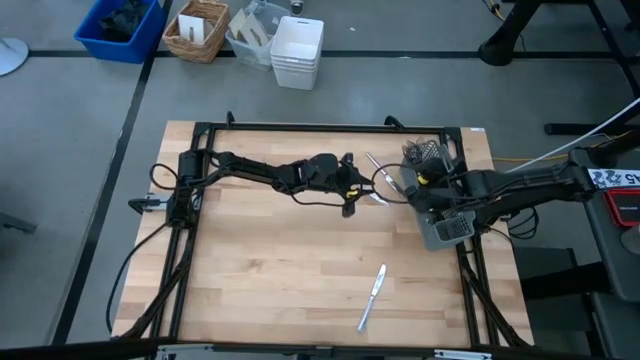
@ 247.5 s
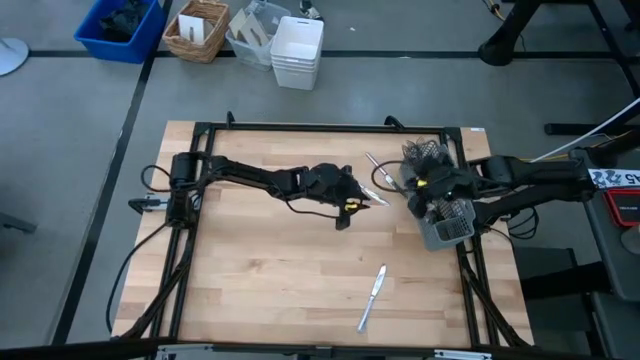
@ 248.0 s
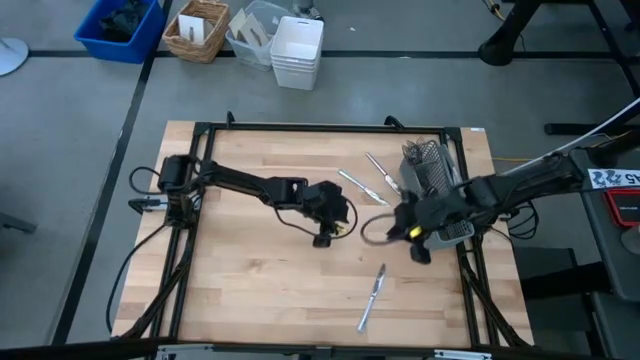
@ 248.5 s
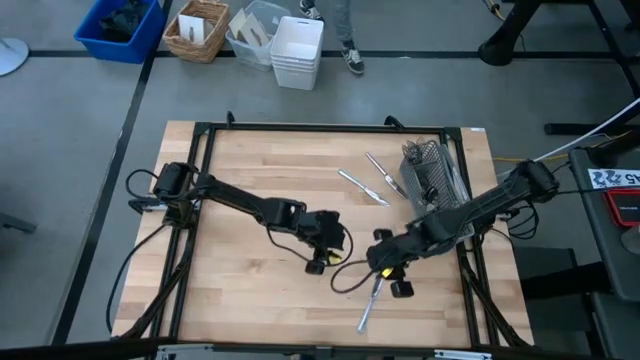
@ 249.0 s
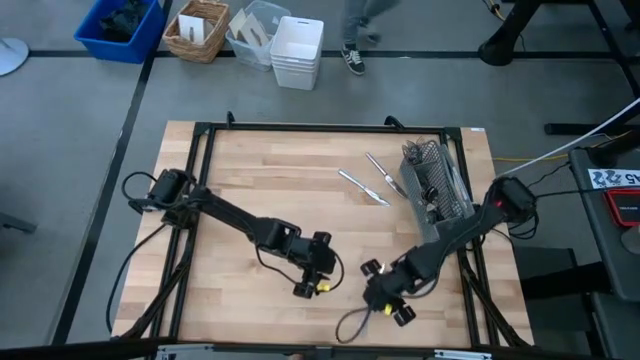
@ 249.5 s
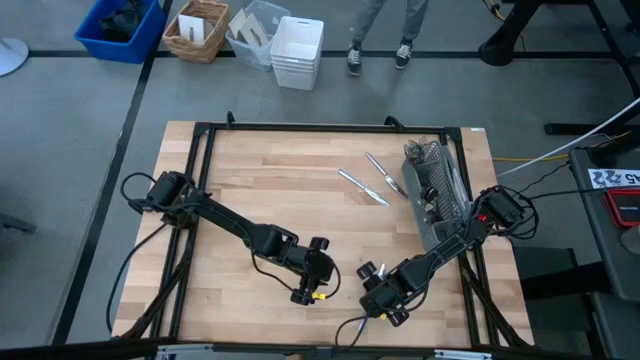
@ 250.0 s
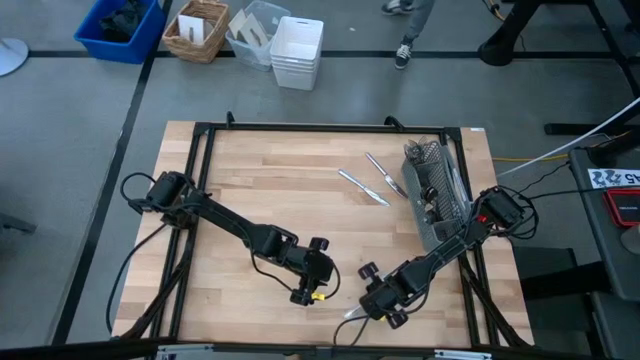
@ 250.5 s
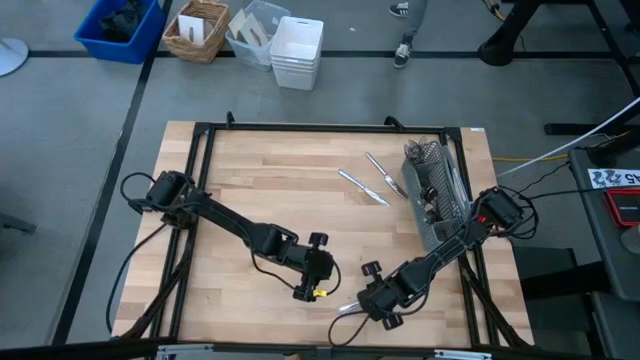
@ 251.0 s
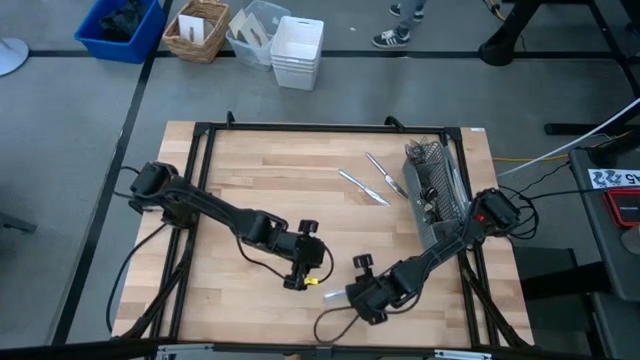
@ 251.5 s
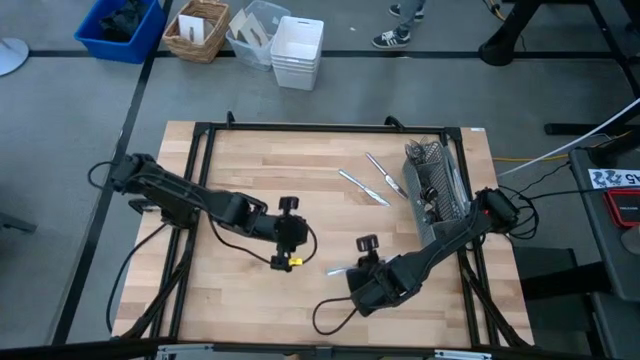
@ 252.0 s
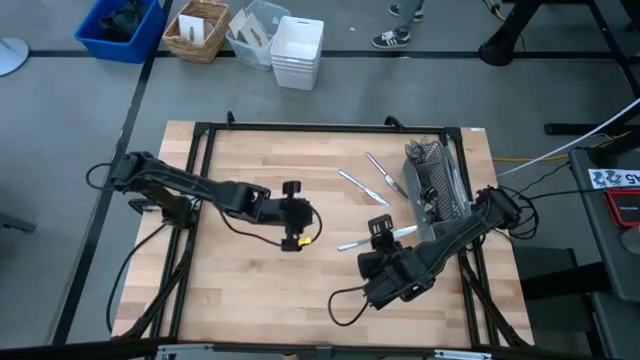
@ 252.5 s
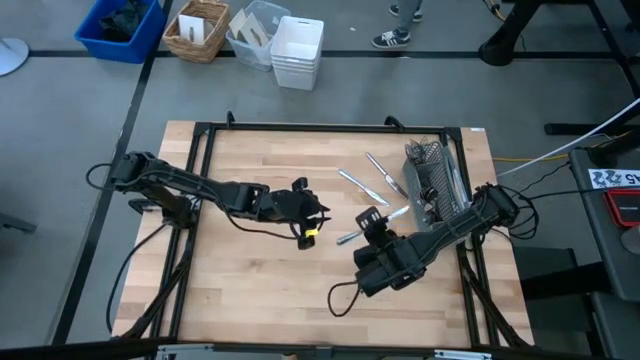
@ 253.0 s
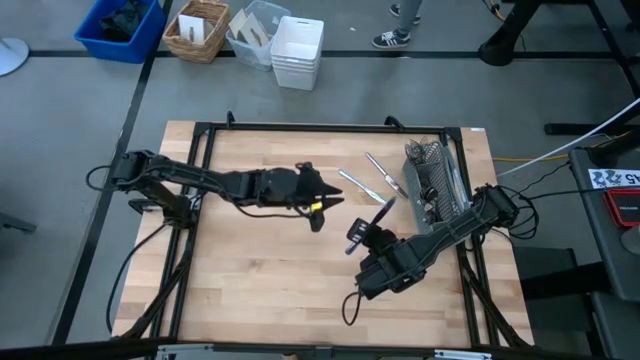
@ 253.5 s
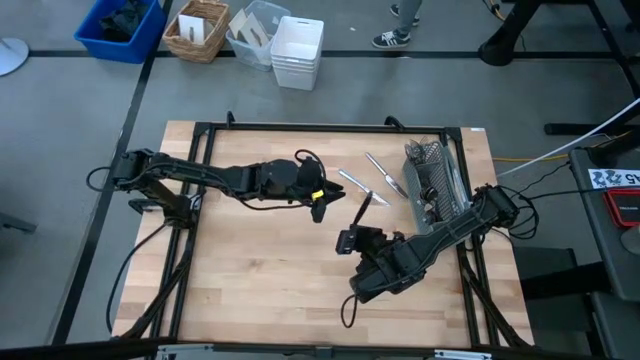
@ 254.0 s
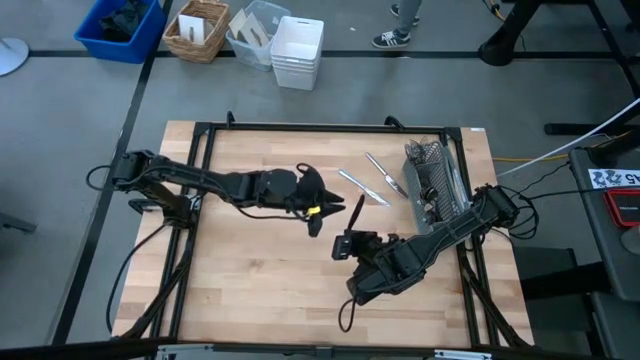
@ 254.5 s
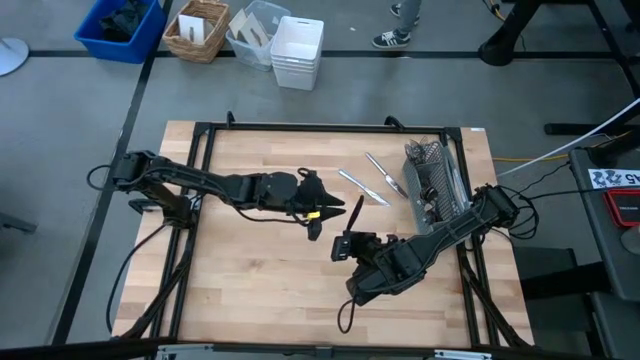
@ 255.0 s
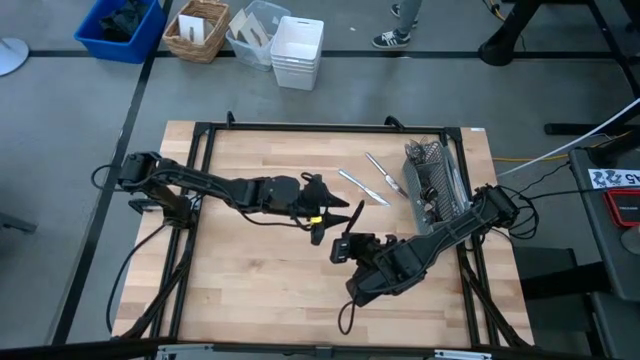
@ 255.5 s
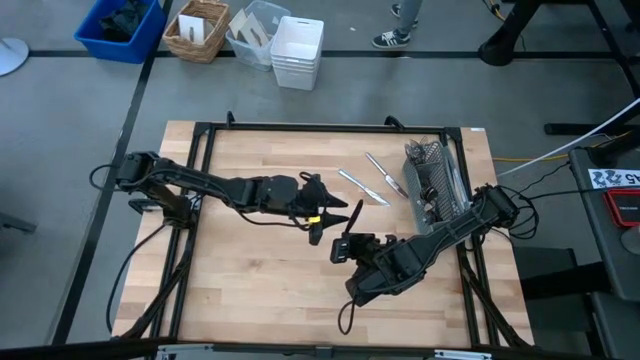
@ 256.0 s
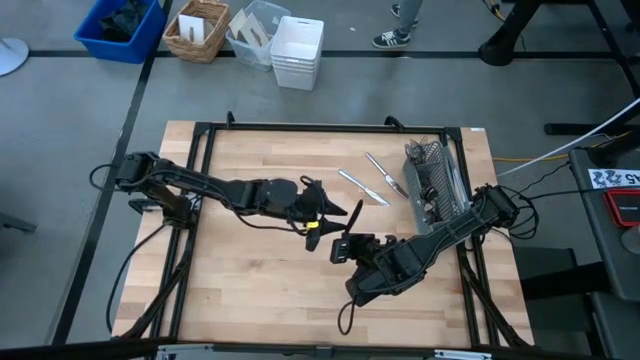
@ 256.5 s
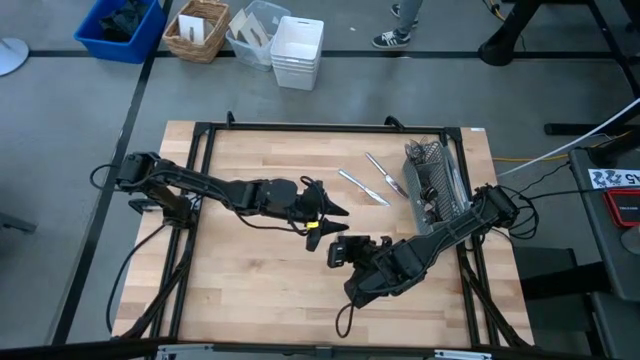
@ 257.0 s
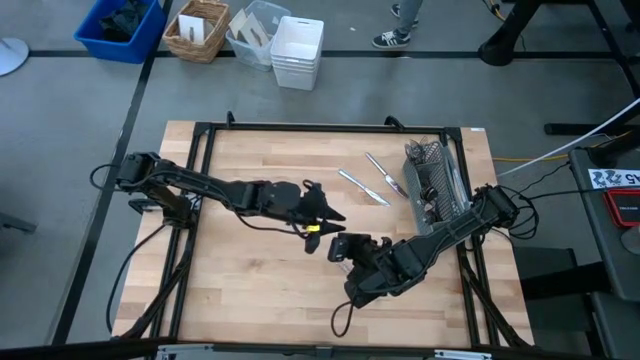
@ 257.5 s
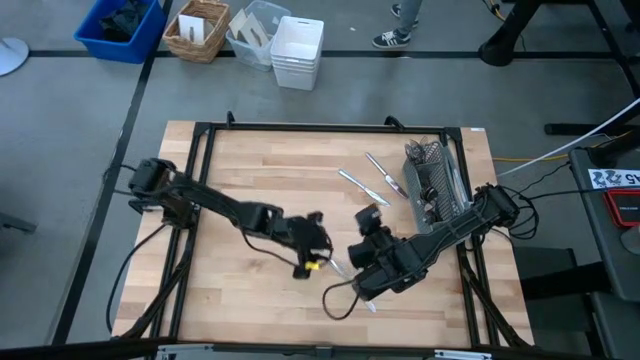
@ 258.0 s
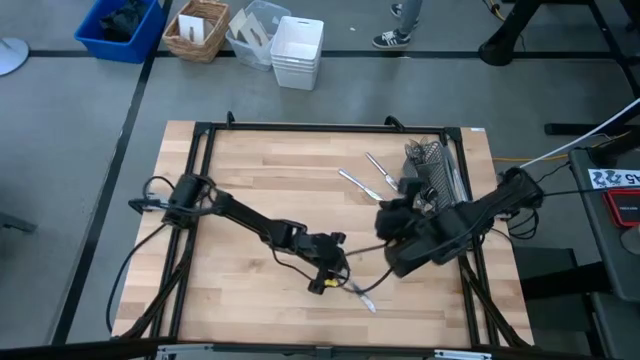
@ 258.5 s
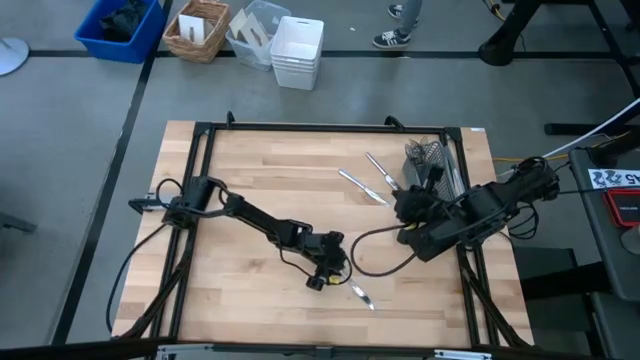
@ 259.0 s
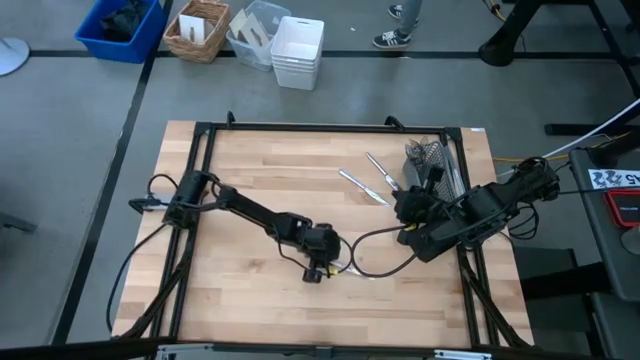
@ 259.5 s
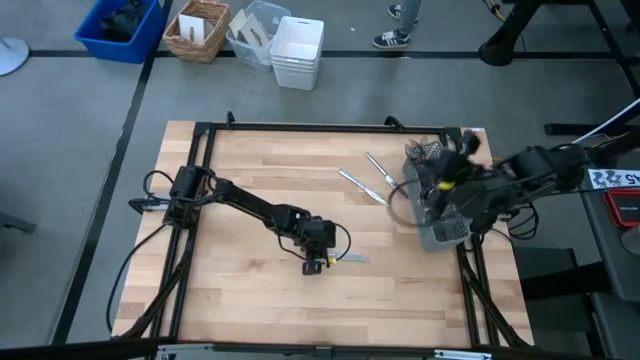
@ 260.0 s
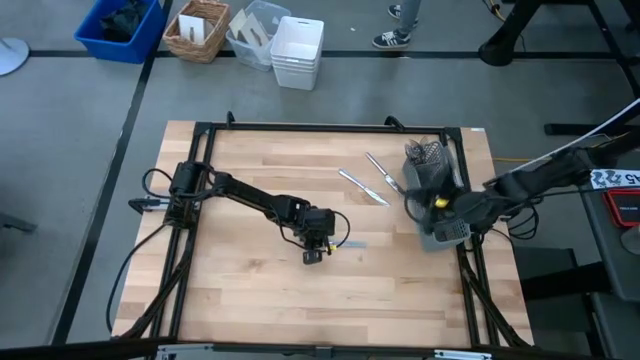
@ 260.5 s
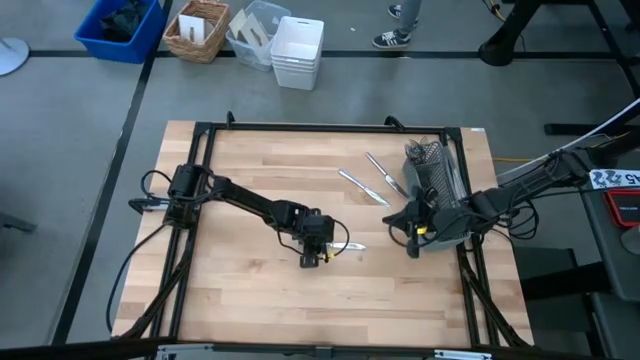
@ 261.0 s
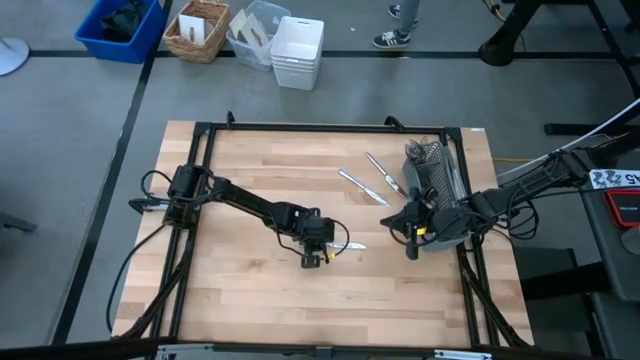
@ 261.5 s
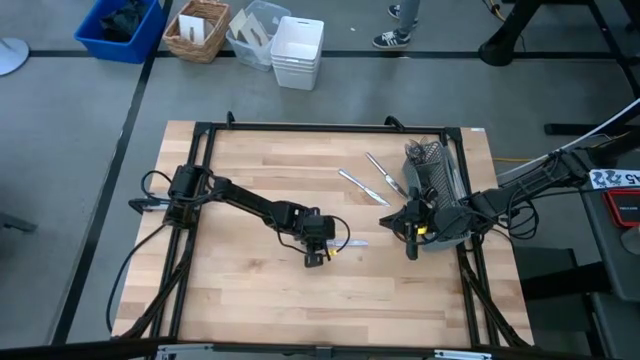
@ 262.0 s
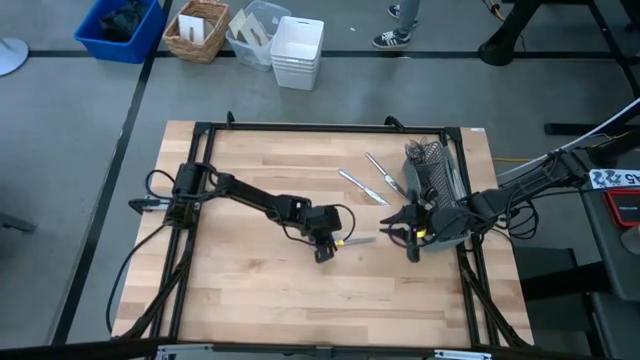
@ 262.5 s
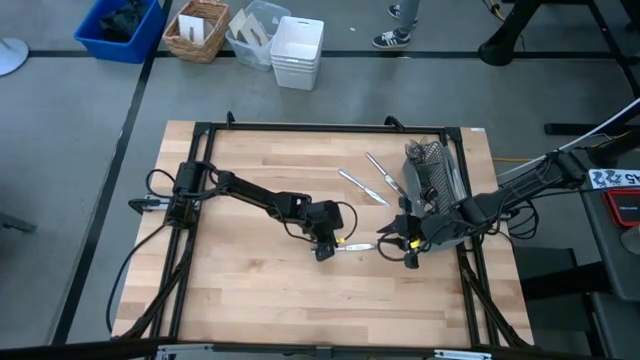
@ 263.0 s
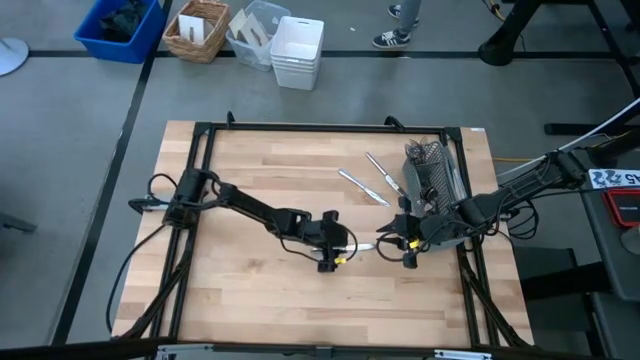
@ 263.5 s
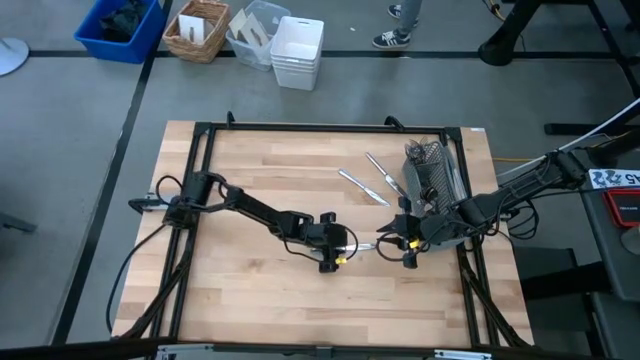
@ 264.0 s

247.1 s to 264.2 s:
Task: Sort silverware
Put the bottom knife into the middle section of the utensil holder

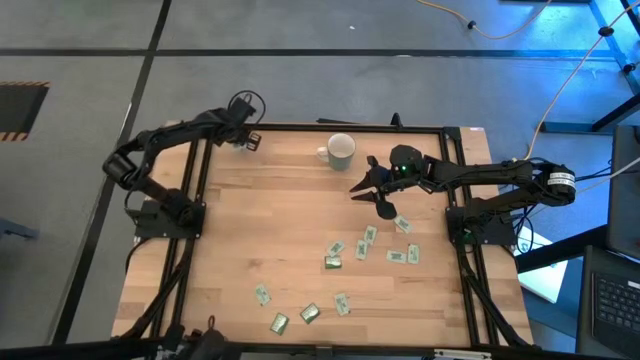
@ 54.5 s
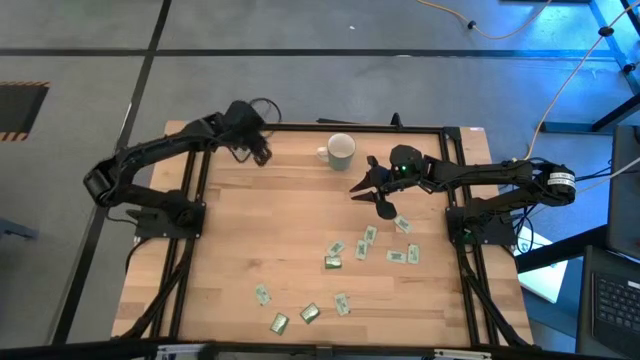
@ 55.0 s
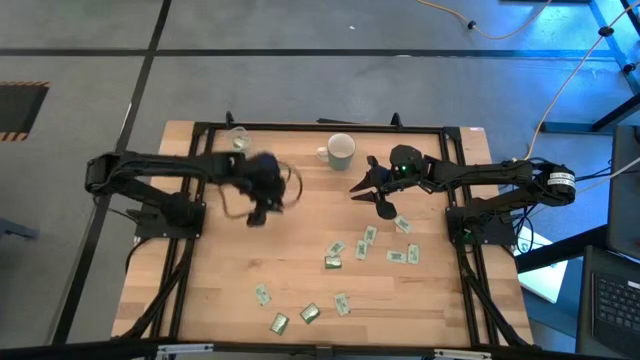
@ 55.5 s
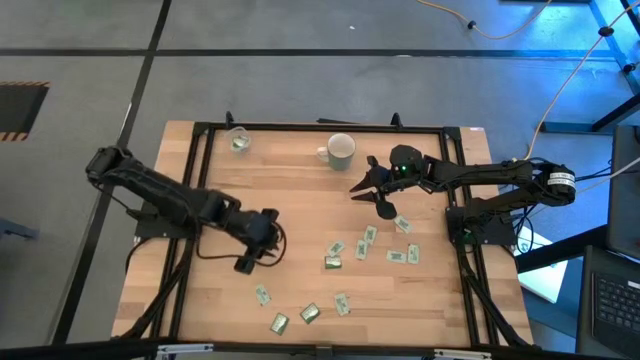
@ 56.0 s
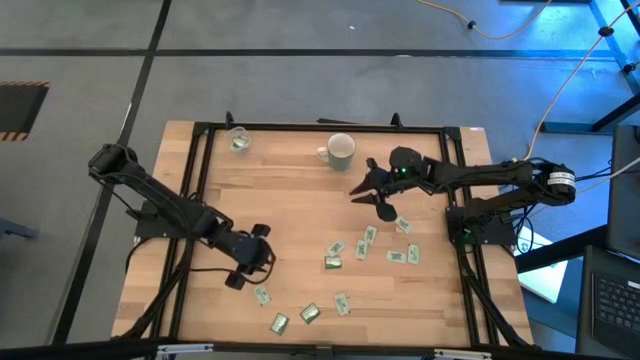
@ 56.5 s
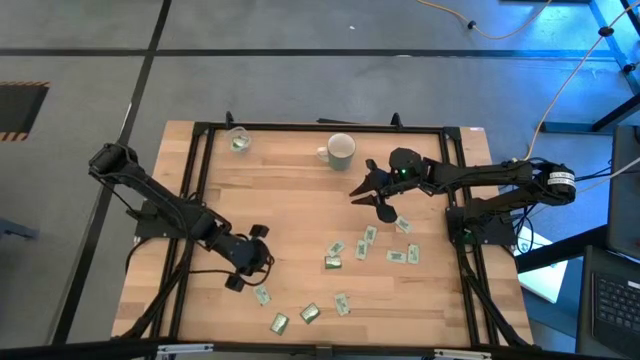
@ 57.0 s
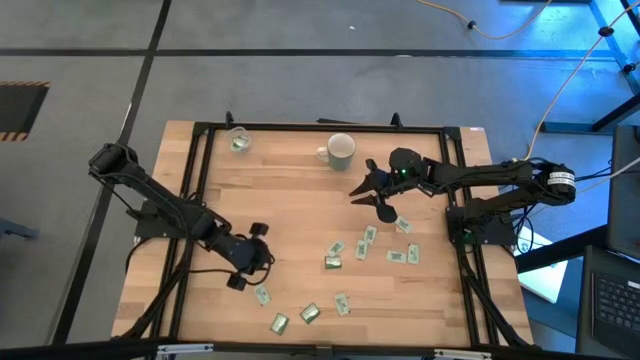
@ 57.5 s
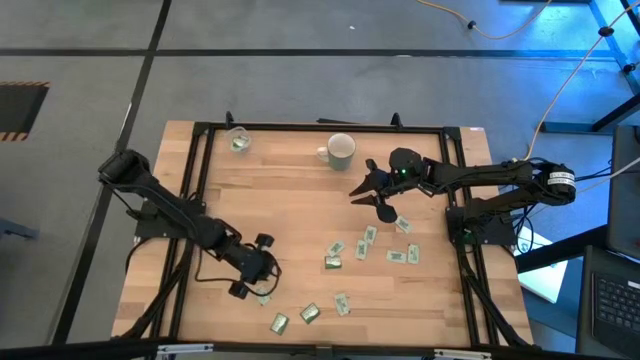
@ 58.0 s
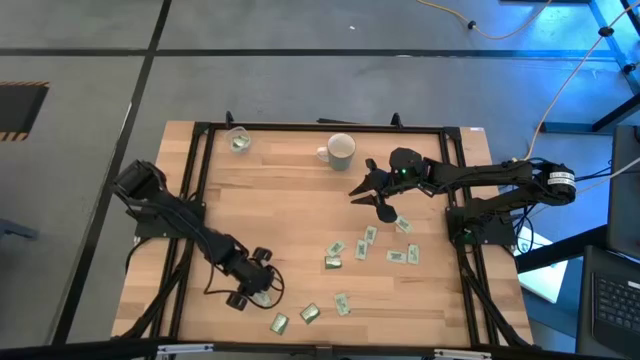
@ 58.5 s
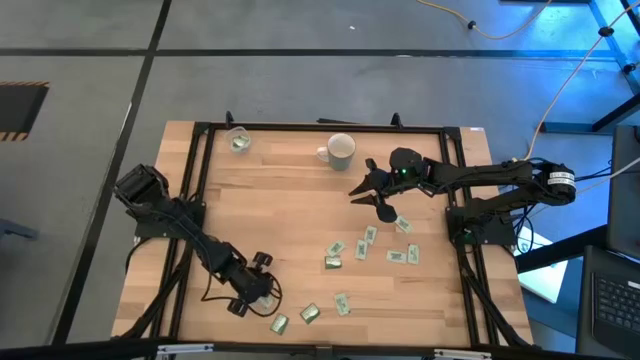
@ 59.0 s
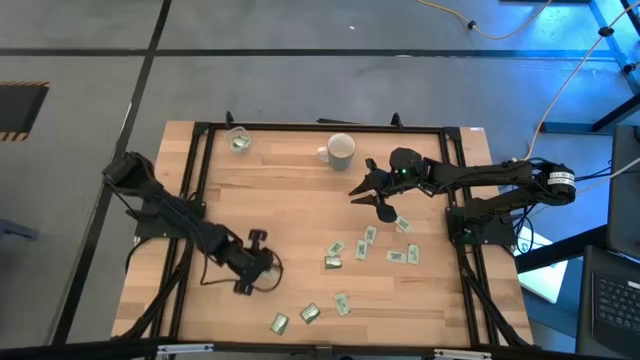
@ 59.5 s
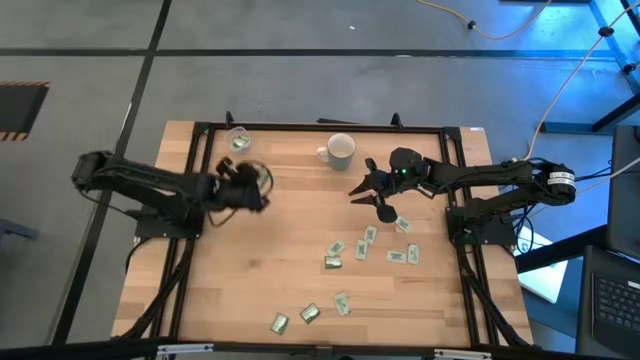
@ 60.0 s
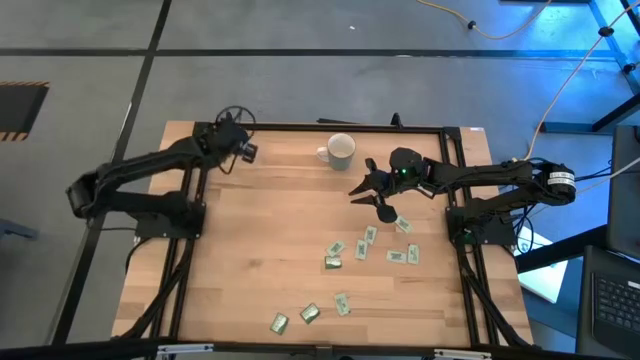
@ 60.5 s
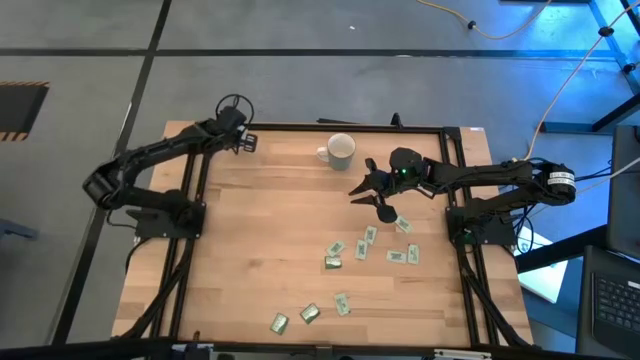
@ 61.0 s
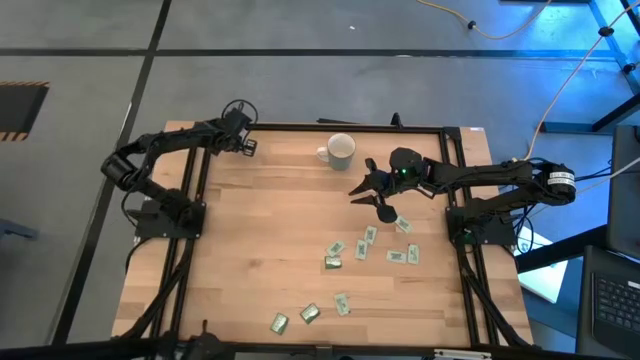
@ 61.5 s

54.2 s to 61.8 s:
Task: Pick and place Stevia / Truvia into bins
Put the stevia packet into the transparent bin
